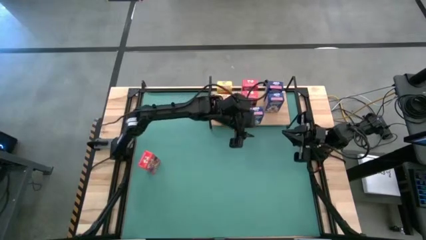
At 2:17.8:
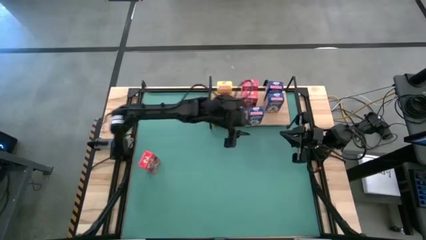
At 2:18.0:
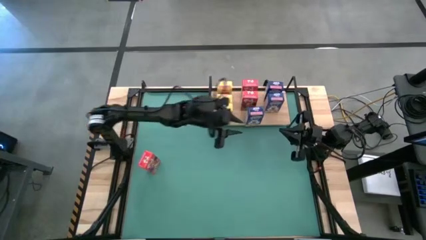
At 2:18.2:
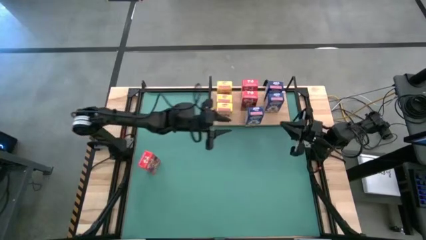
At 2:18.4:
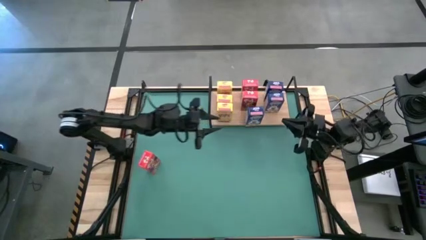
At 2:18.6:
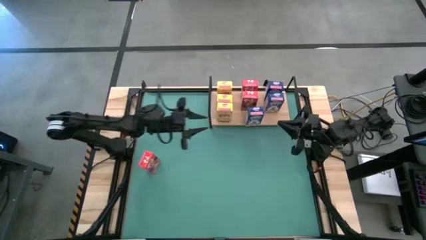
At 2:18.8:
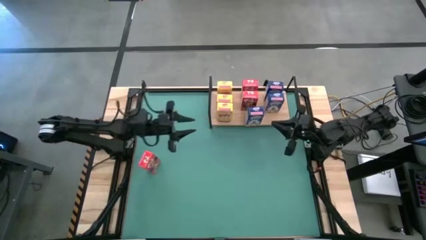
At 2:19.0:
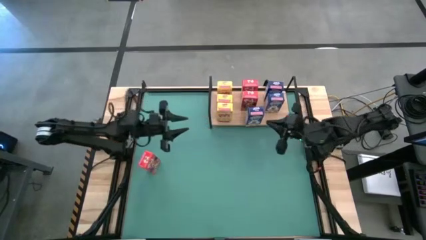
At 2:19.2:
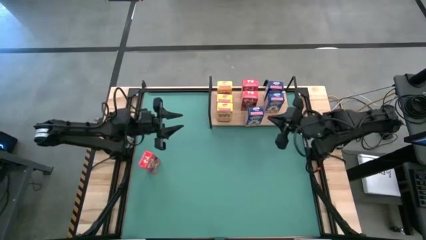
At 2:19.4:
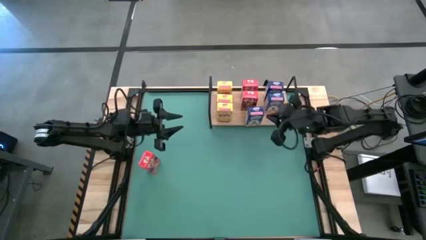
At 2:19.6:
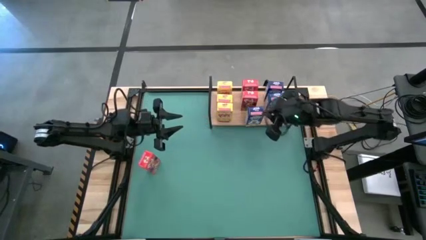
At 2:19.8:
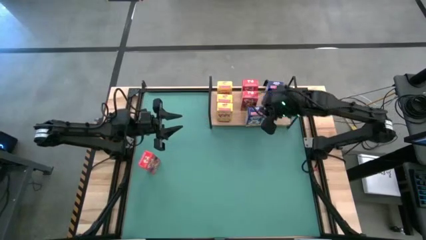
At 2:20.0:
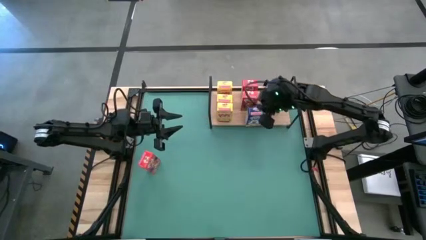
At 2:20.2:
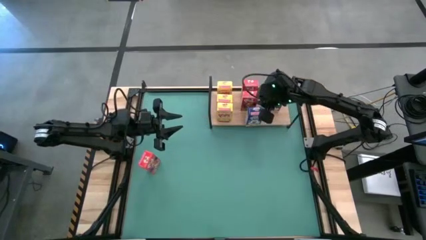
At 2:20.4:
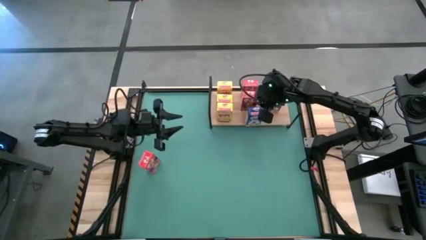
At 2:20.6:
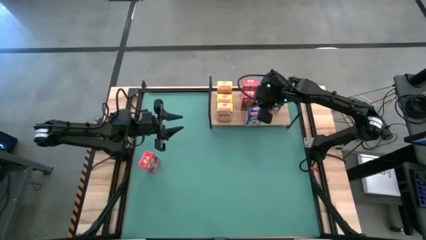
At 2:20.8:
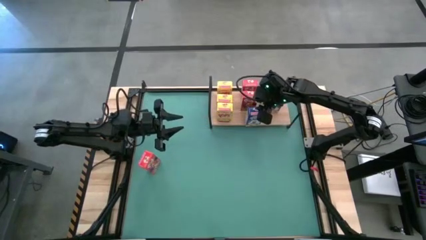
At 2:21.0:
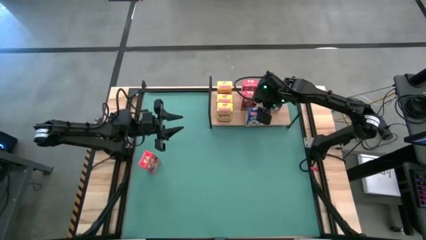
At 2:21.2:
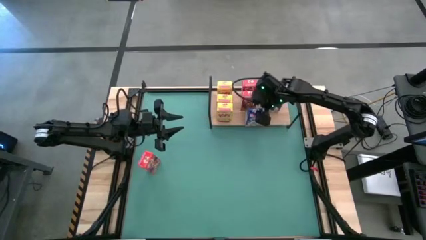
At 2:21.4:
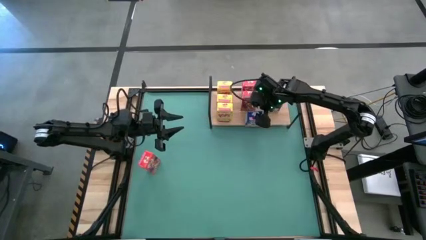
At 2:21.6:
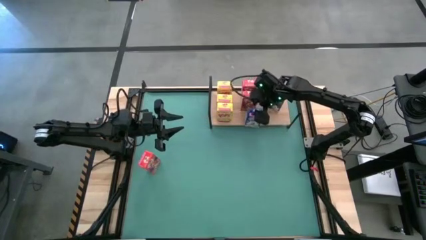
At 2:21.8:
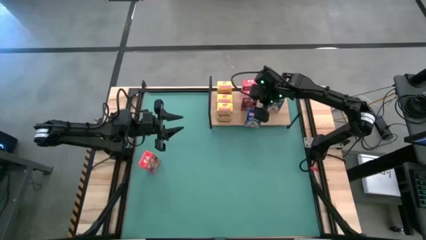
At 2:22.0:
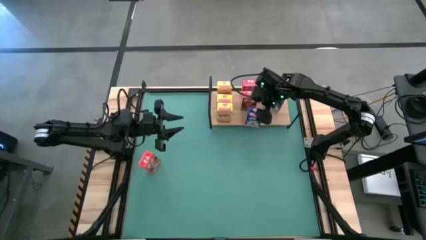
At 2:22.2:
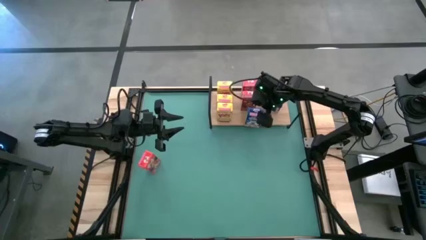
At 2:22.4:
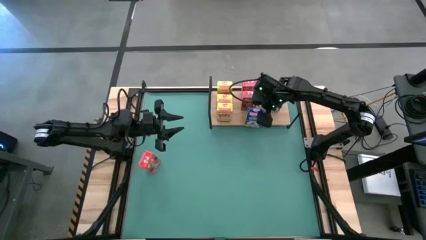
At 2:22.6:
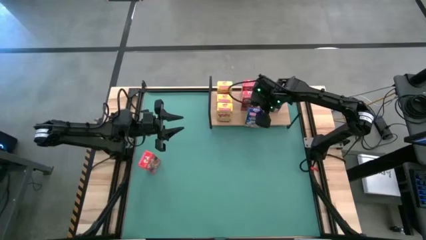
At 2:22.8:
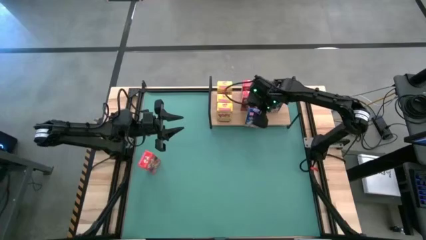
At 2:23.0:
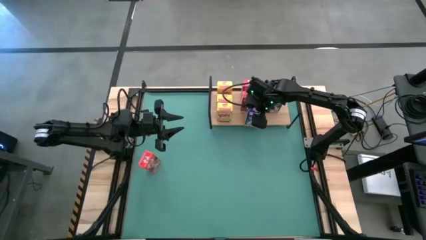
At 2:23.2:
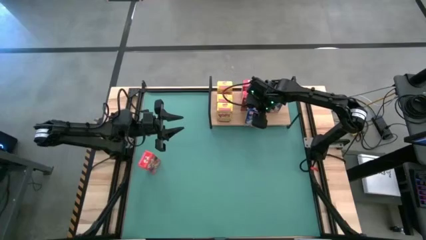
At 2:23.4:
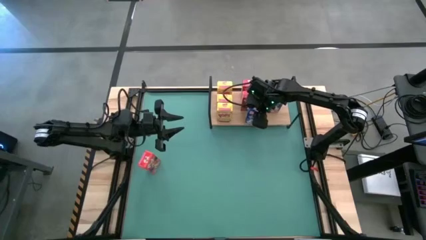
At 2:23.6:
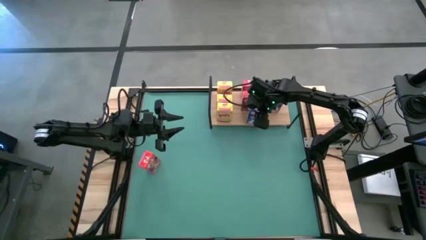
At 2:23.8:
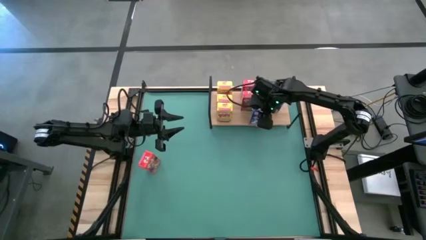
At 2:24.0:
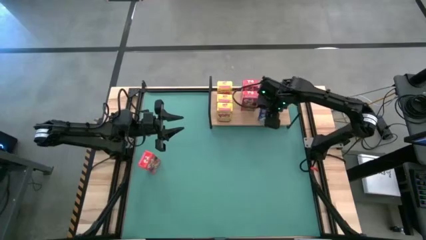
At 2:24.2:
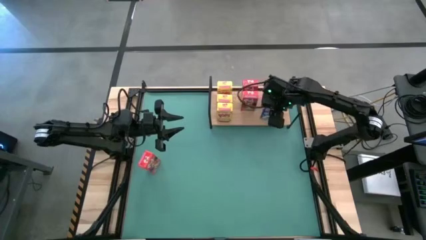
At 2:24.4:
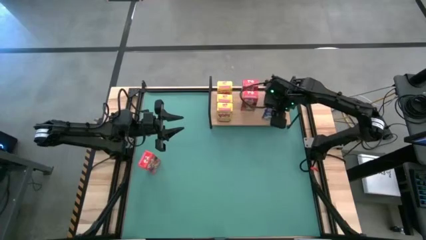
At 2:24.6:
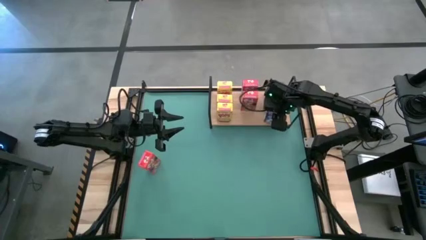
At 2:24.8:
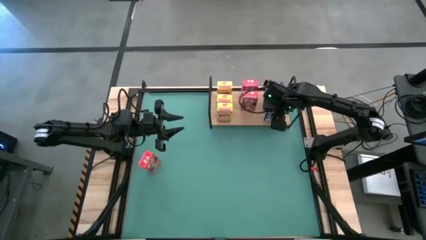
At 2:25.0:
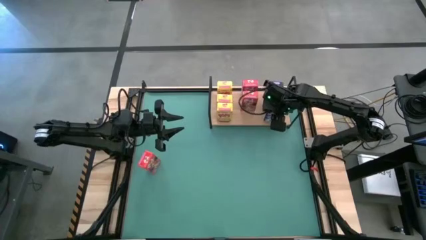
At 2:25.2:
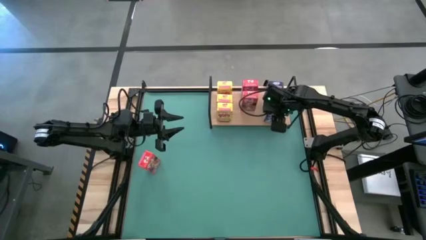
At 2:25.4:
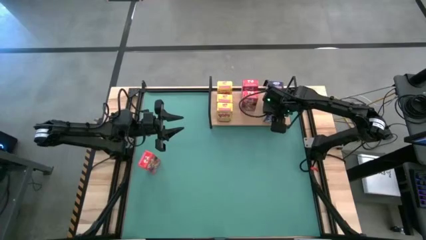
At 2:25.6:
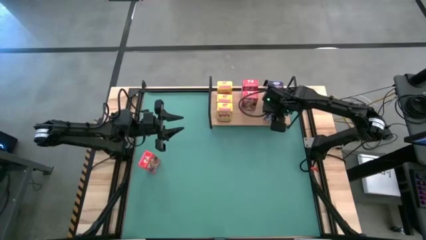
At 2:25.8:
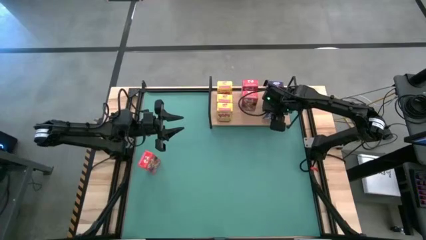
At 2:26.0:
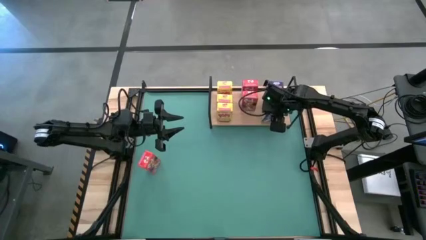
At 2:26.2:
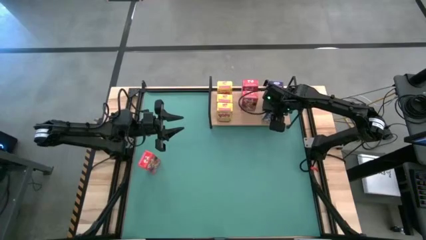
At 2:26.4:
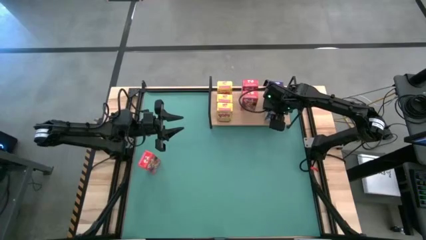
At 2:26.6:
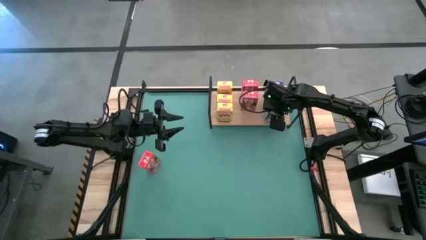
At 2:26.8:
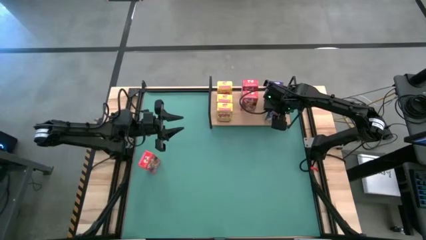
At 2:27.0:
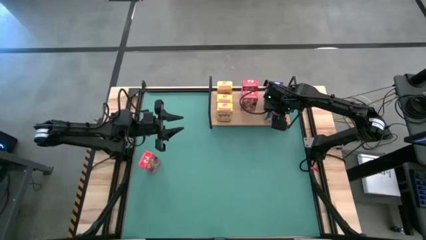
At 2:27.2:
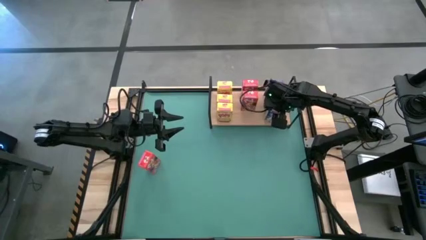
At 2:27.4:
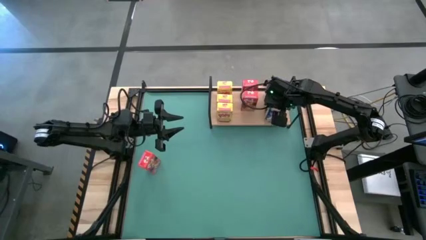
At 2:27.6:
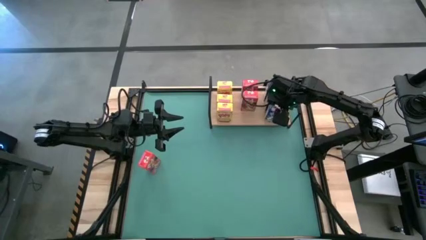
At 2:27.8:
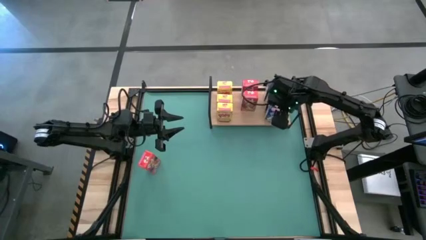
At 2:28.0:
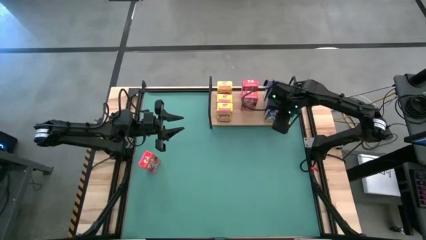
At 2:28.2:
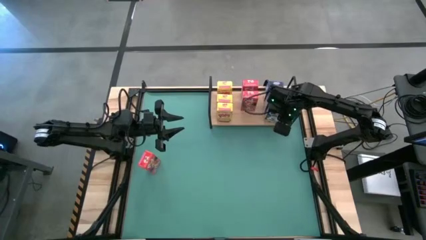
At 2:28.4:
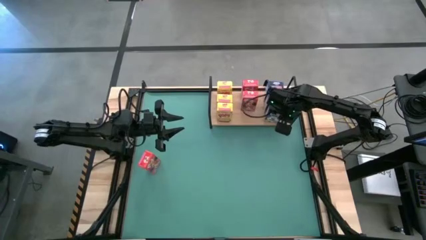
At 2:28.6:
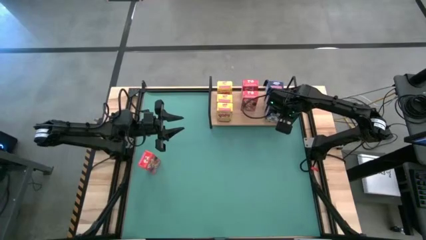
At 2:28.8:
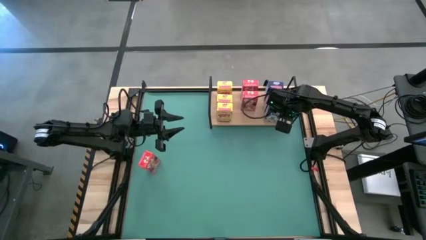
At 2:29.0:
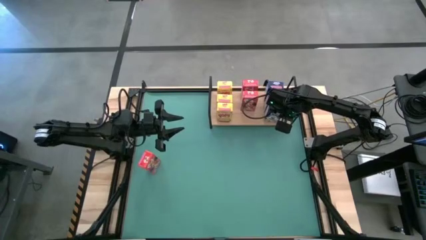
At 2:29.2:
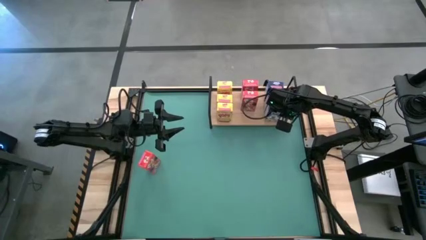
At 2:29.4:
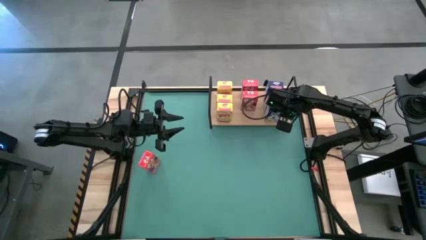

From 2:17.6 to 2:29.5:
Task: Stack cereal on shelf
Put the blue cereal box on the shelf aligned with the other blue cereal boxes
